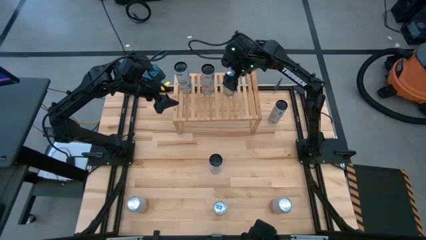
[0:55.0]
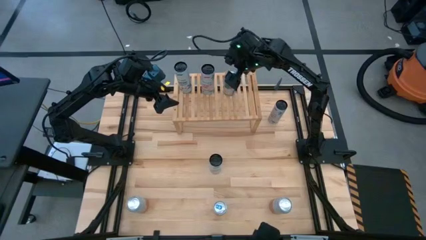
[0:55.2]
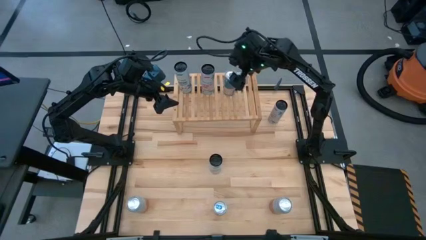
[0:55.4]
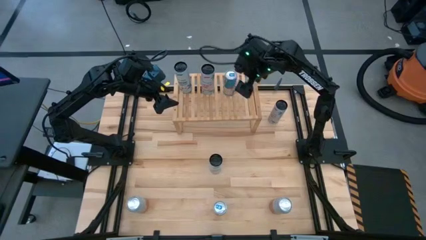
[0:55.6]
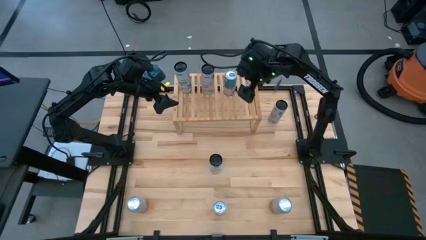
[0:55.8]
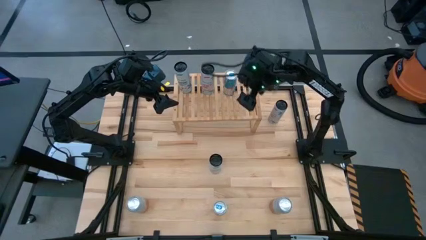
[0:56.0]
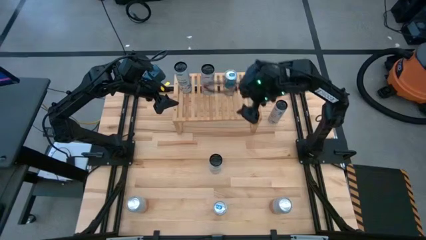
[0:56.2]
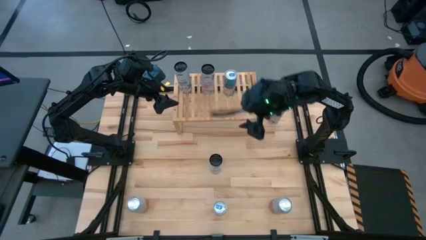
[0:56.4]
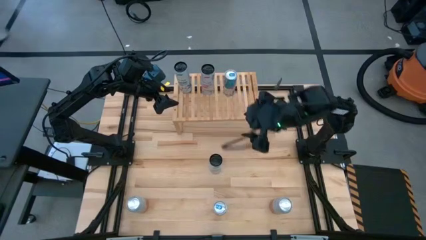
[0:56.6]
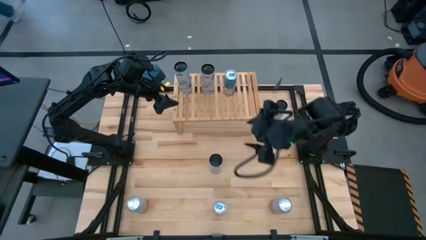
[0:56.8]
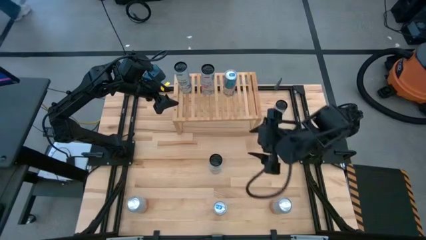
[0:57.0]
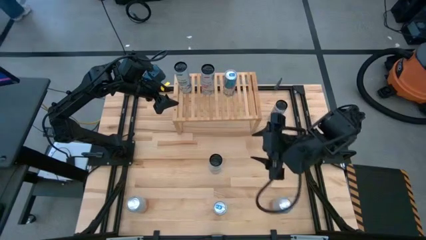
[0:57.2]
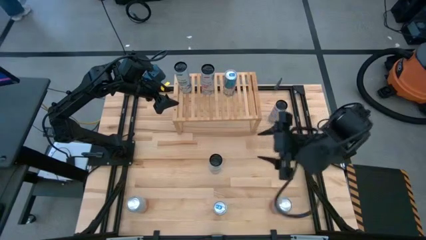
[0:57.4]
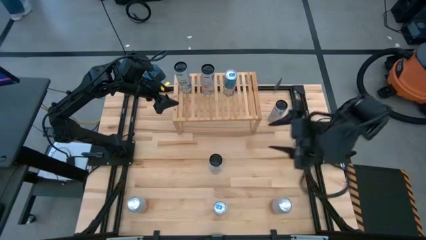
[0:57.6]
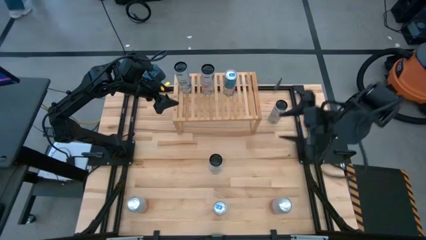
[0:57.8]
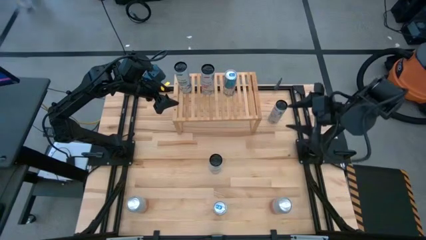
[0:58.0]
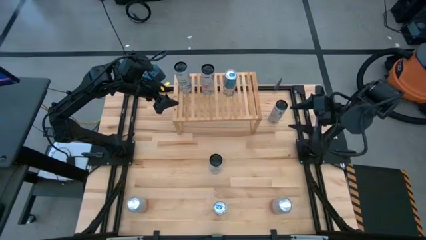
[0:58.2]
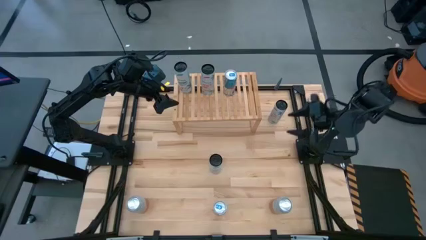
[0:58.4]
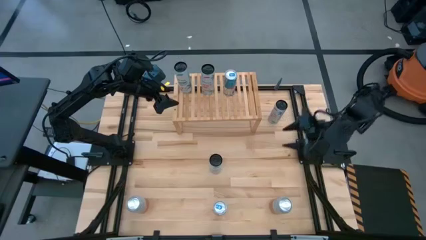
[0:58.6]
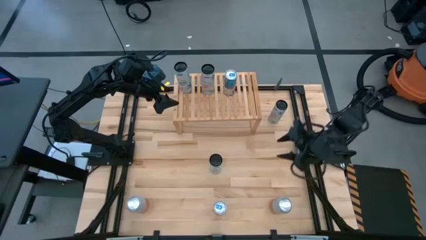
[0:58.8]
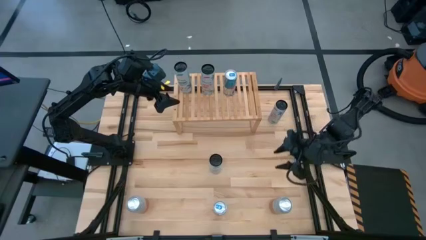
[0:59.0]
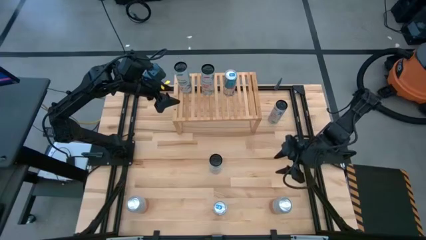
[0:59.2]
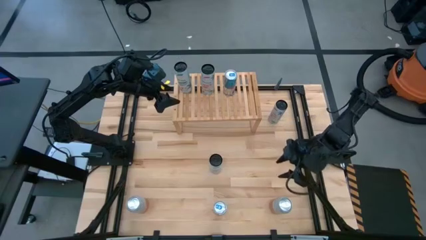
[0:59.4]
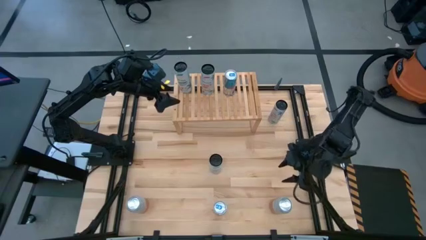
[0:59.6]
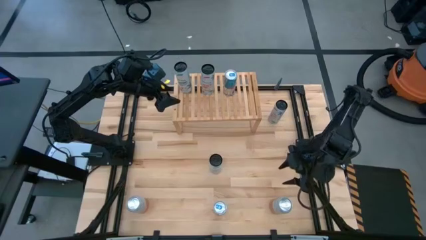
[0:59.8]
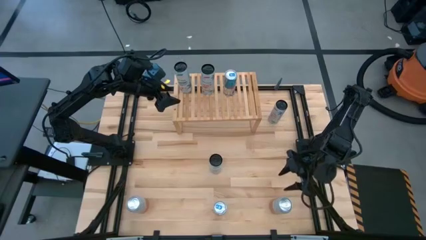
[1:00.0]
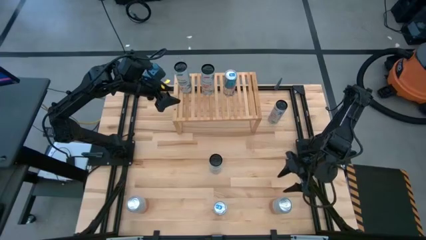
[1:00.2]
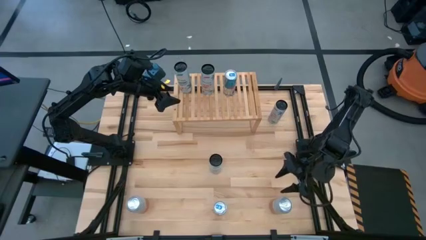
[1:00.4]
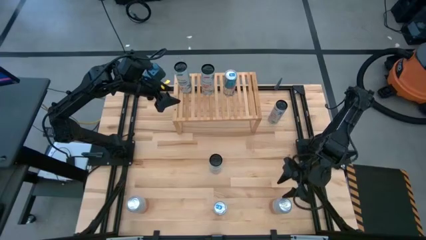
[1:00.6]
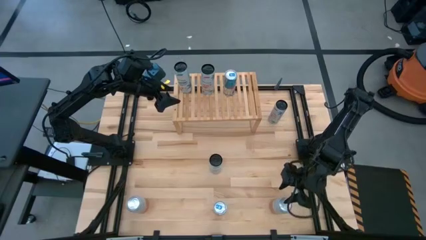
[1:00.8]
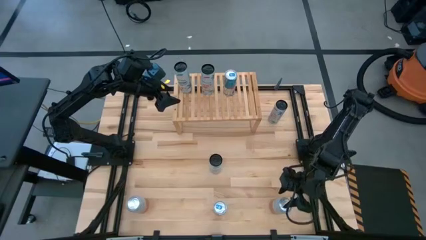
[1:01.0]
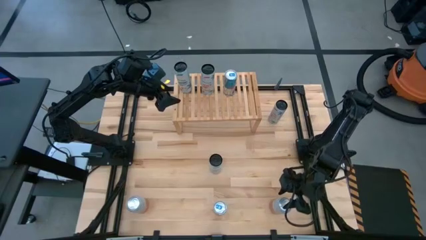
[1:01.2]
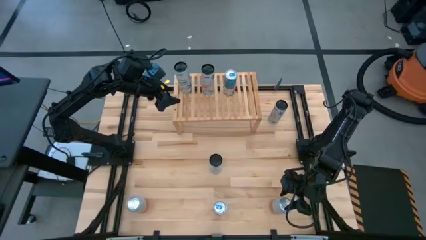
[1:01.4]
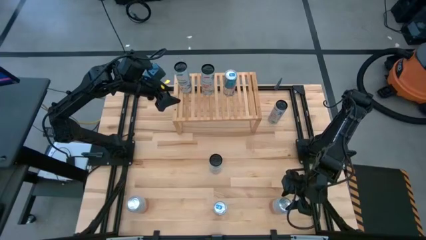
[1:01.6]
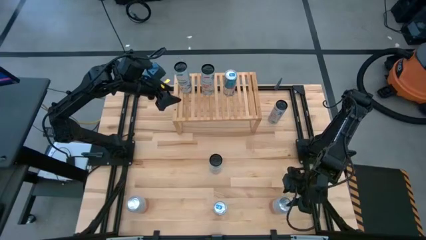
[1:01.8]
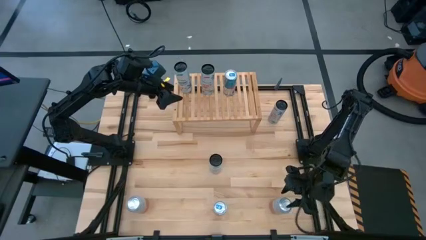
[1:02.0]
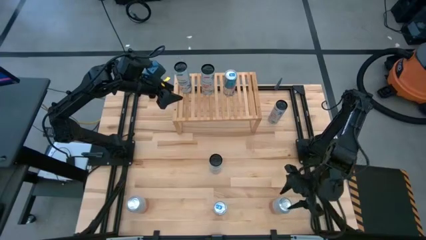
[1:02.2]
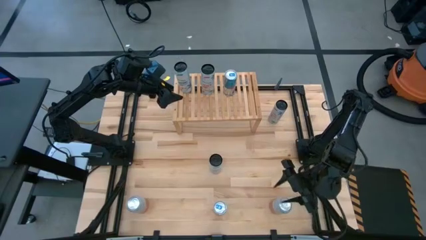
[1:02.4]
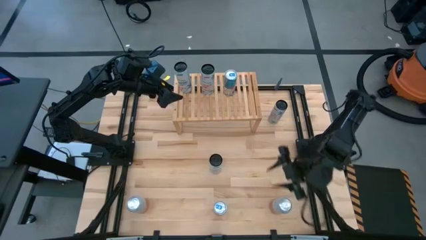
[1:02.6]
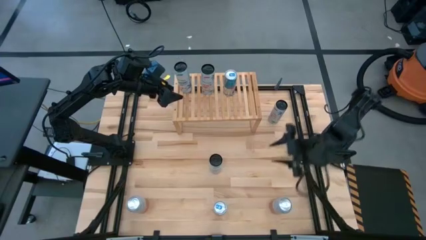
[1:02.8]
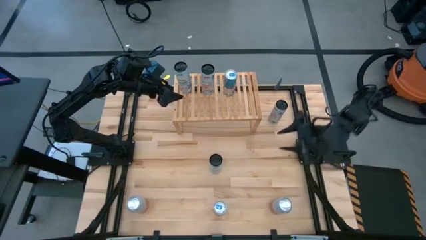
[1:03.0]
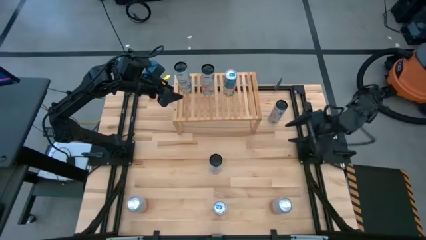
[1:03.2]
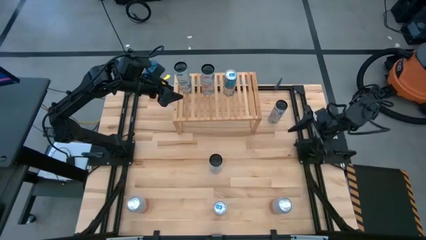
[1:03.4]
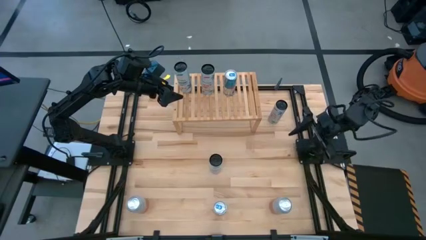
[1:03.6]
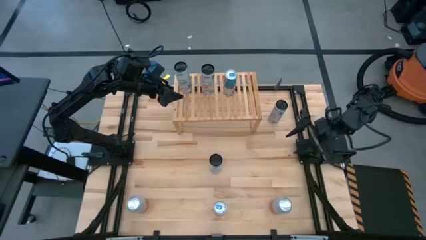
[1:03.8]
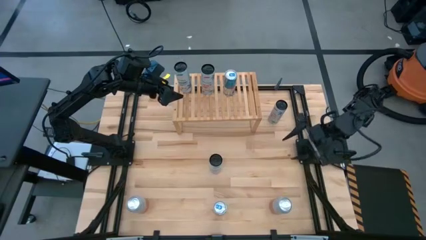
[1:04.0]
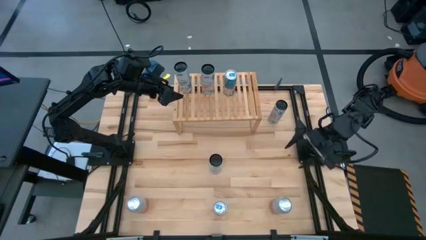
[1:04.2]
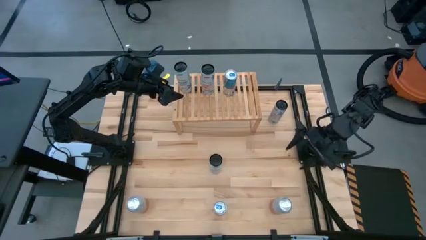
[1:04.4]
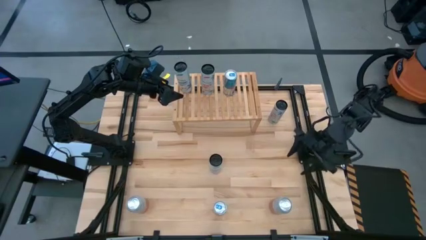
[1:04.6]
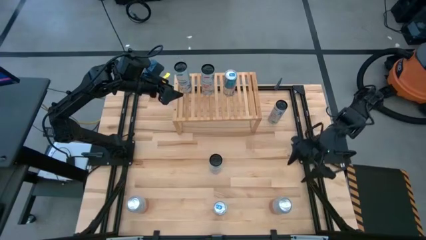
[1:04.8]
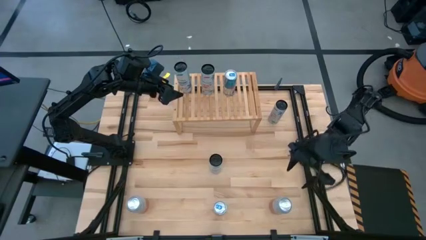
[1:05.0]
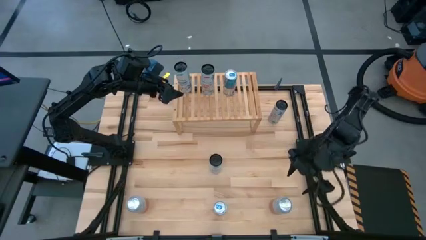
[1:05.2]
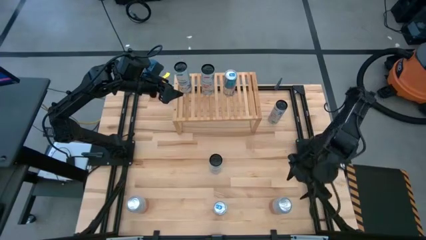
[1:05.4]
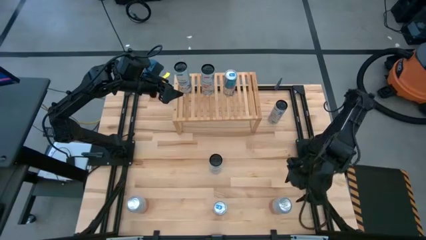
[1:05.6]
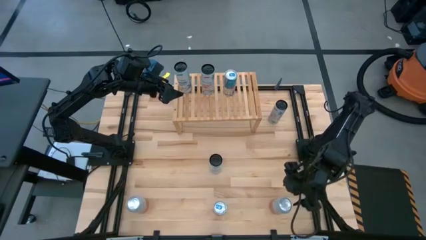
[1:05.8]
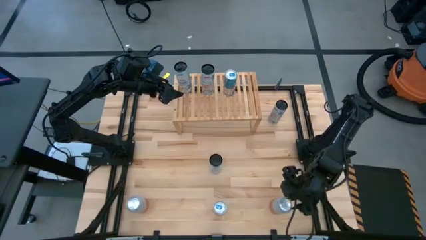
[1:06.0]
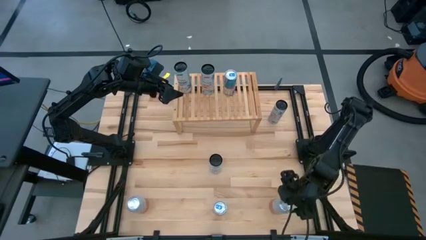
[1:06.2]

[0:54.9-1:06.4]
Task: Place canned beverage on shelf
Put the pink-white soda can on the shelf aligned with the other pink-white soda can

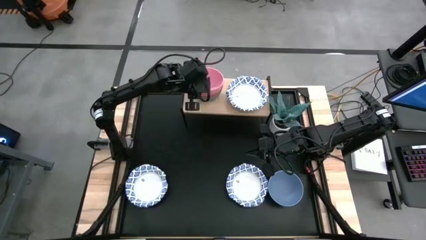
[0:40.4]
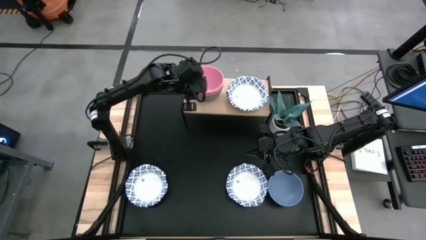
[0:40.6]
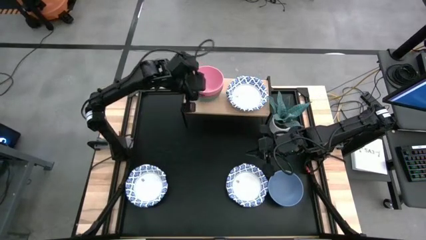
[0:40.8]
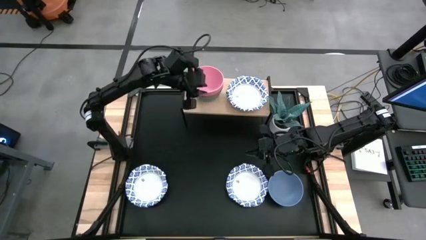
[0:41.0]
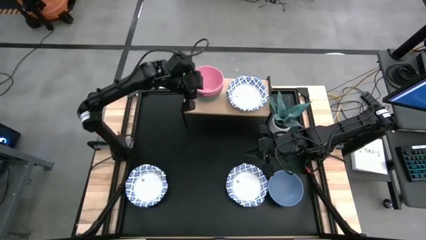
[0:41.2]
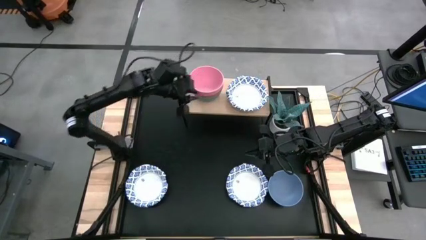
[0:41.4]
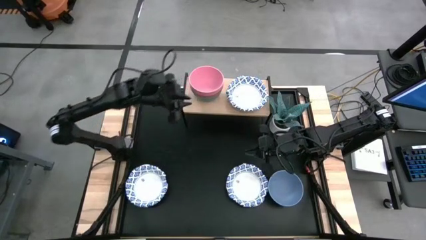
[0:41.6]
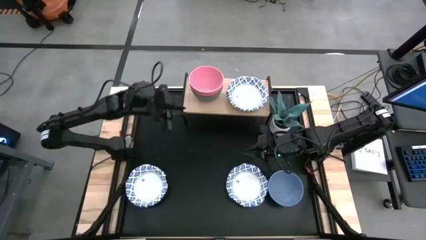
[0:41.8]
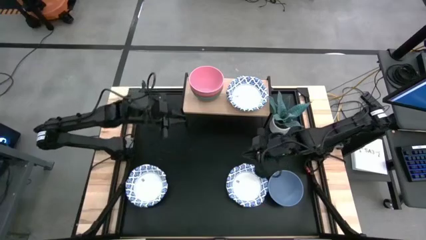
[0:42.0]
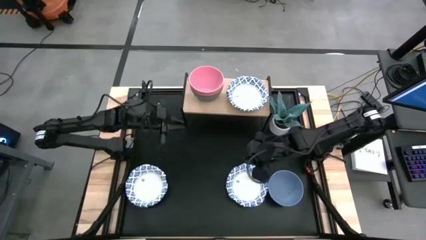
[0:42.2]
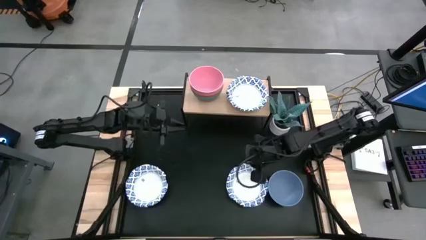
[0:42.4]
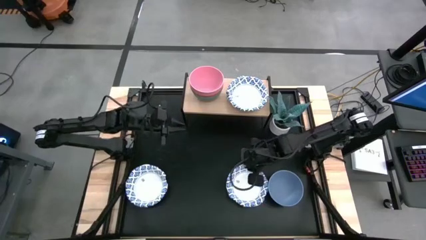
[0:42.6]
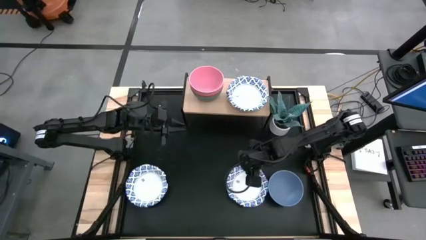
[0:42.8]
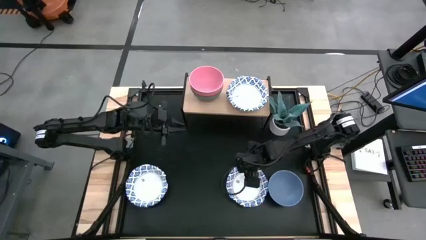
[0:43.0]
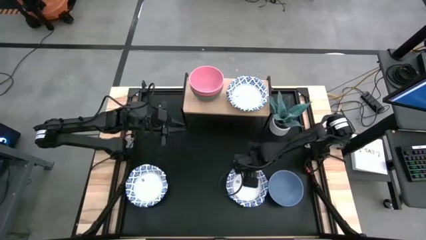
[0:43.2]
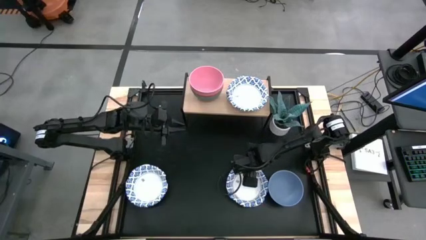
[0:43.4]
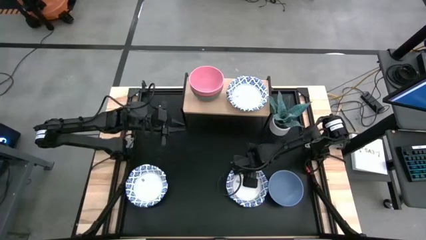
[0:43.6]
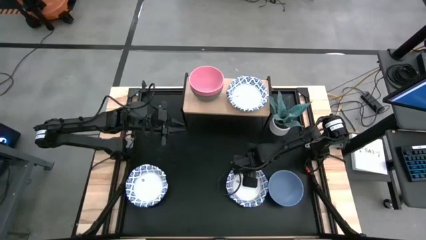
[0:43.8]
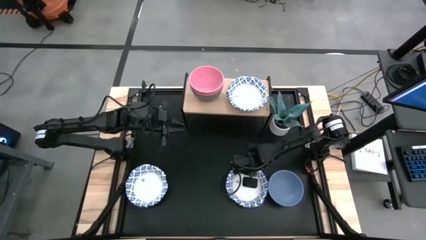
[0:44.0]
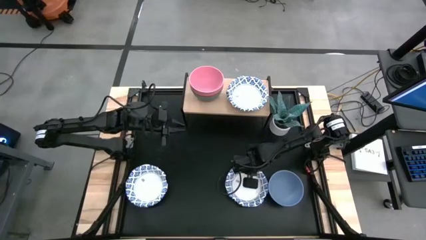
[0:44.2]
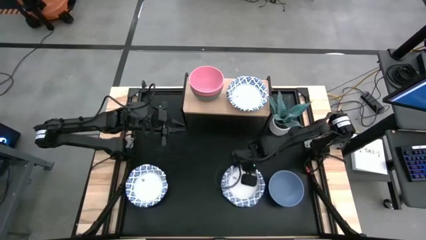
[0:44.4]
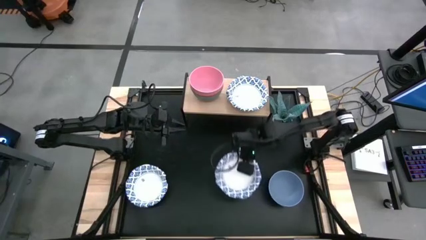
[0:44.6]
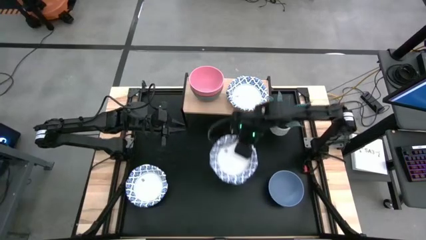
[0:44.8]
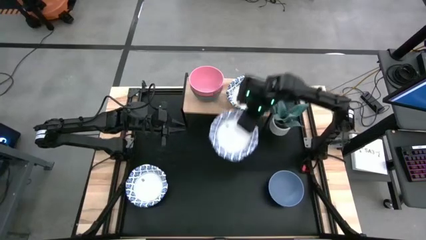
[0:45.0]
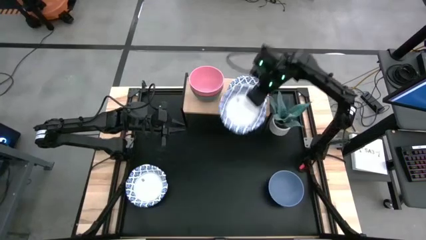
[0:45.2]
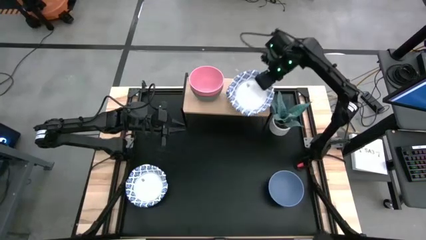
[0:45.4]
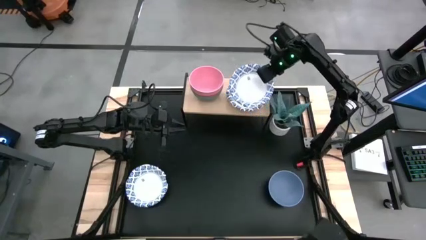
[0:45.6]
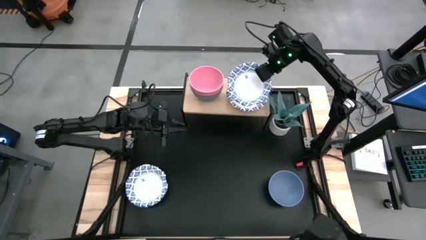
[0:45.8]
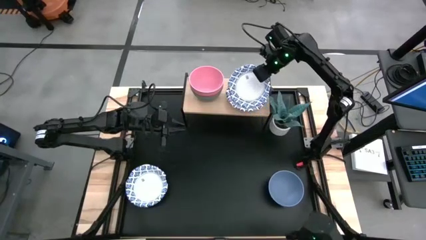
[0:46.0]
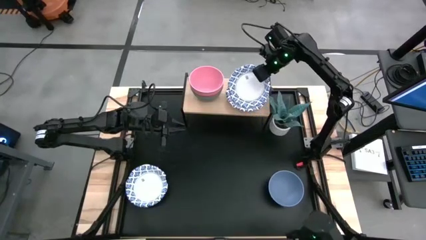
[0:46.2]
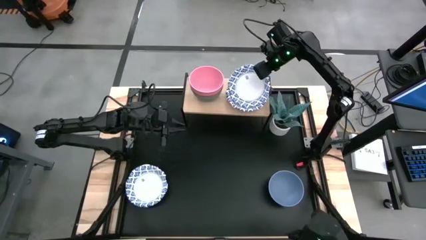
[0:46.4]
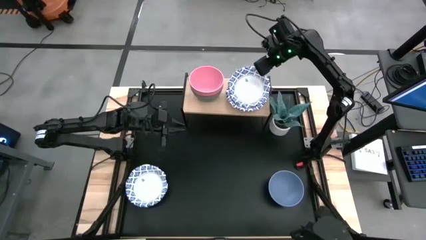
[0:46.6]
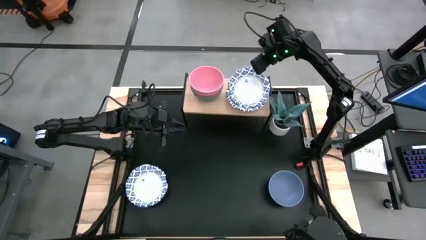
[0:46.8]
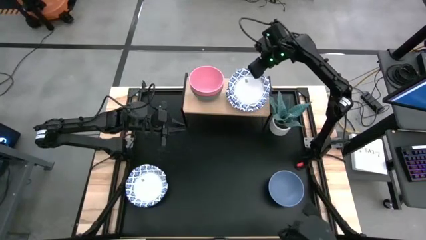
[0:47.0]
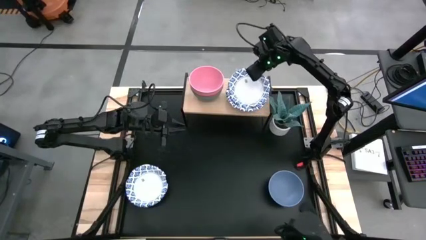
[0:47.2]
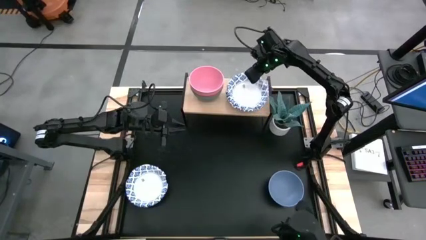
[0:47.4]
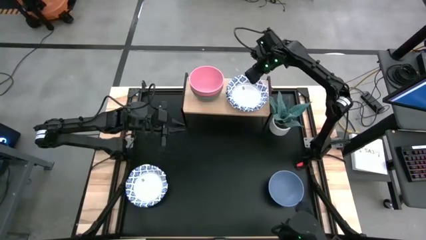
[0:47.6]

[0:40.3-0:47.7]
Task: Place and stack bowls onto a shelf
Stack the white with blue patterned bowl on top of the white with blue patterned bowl on the shelf
